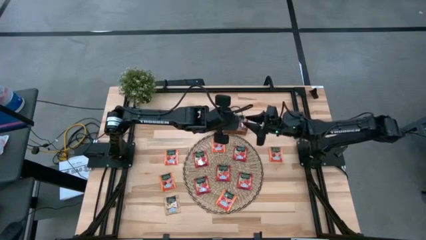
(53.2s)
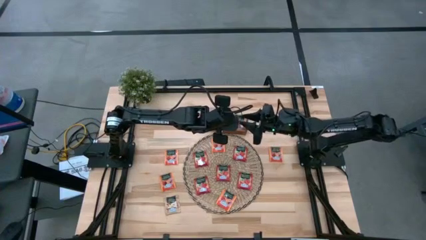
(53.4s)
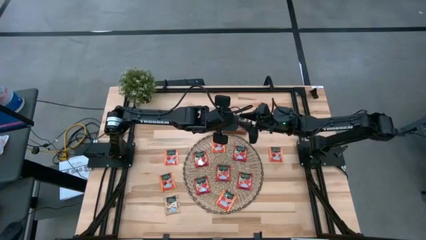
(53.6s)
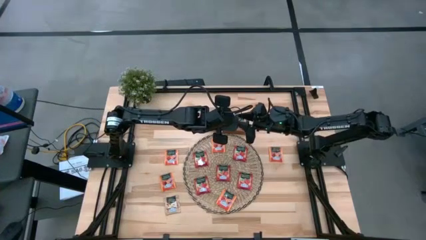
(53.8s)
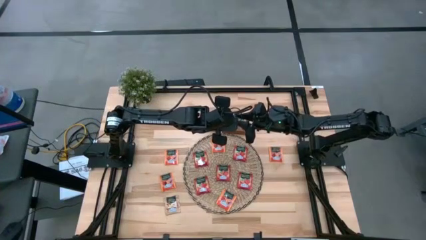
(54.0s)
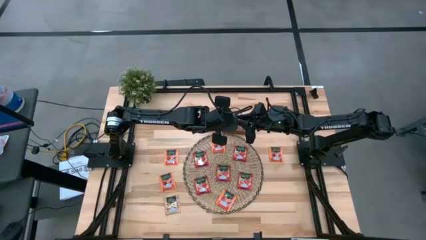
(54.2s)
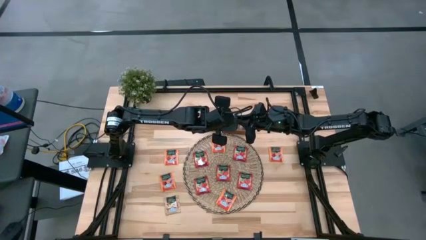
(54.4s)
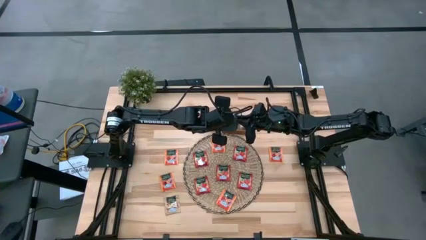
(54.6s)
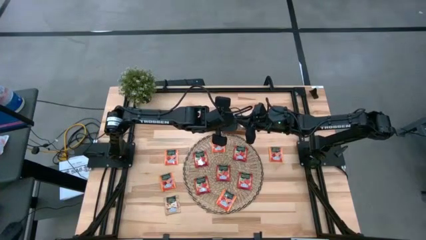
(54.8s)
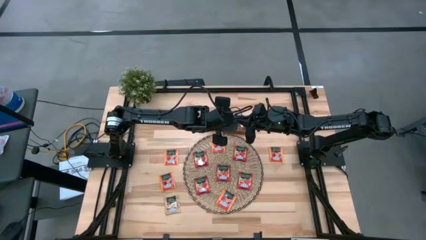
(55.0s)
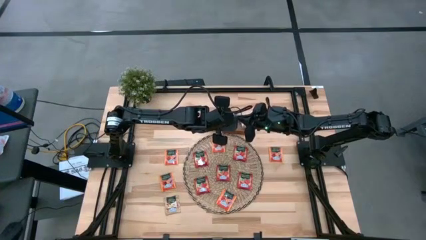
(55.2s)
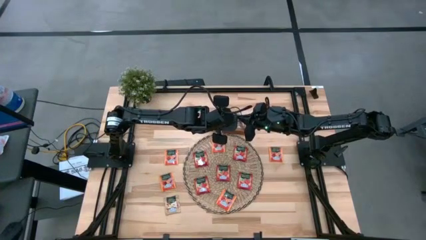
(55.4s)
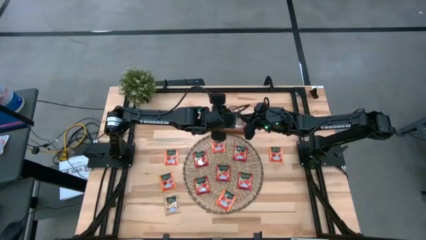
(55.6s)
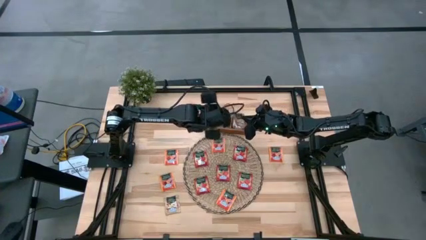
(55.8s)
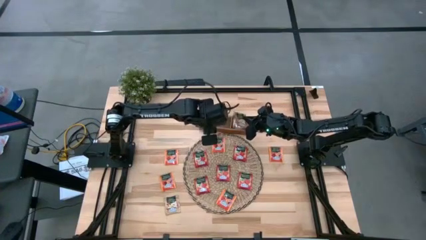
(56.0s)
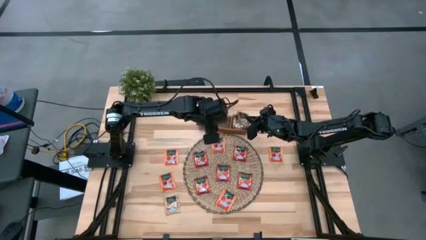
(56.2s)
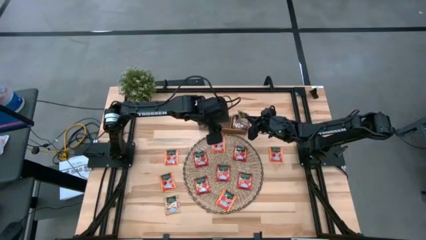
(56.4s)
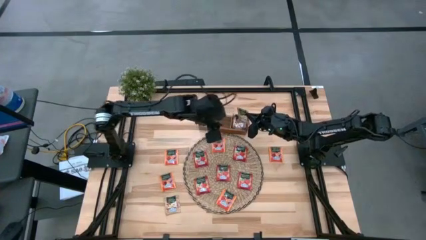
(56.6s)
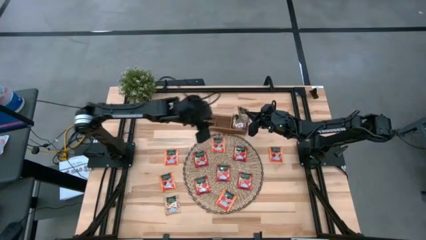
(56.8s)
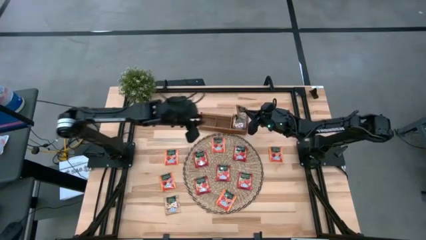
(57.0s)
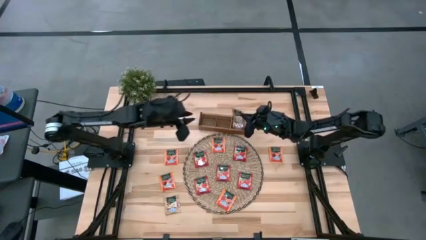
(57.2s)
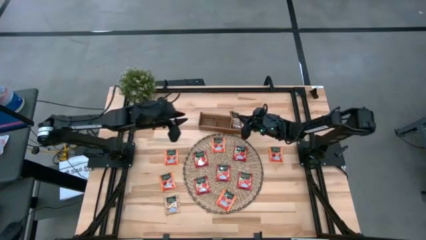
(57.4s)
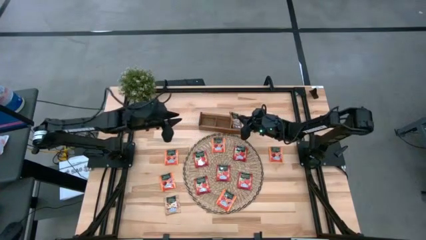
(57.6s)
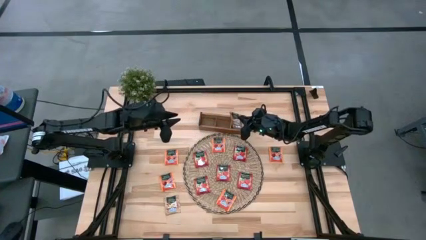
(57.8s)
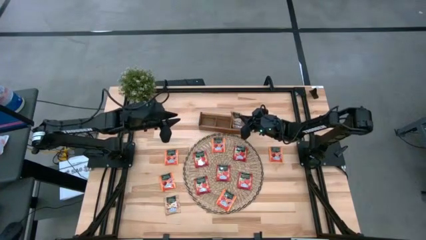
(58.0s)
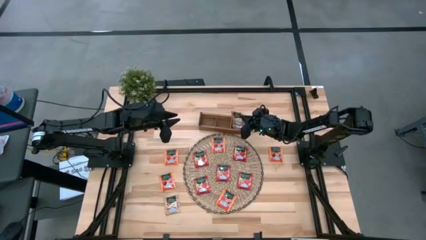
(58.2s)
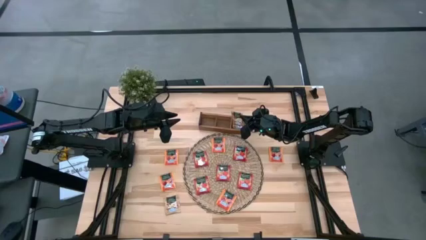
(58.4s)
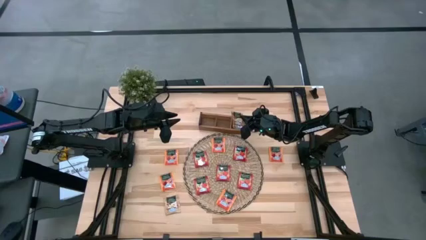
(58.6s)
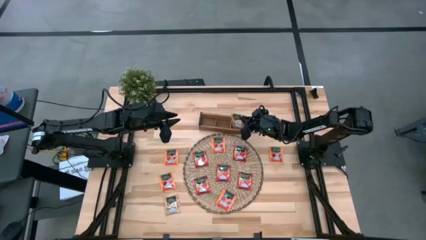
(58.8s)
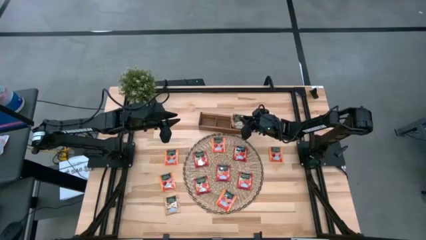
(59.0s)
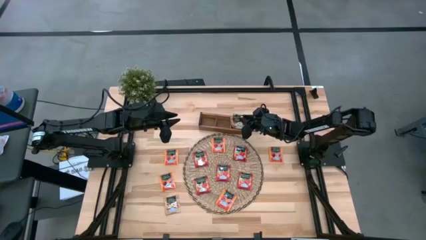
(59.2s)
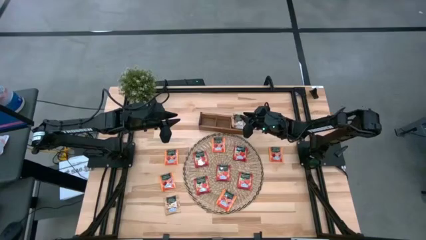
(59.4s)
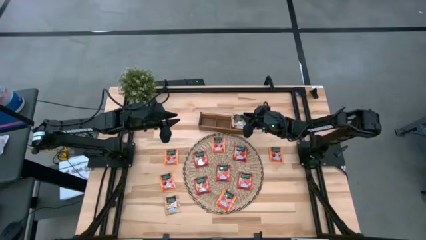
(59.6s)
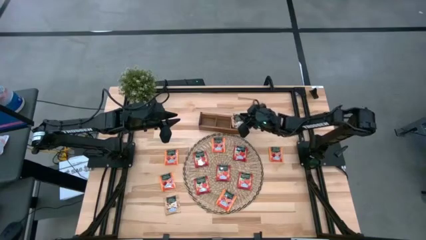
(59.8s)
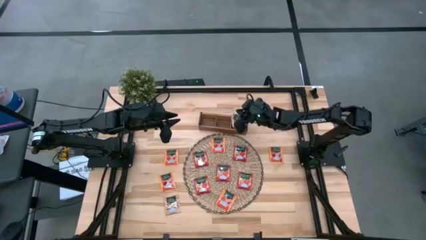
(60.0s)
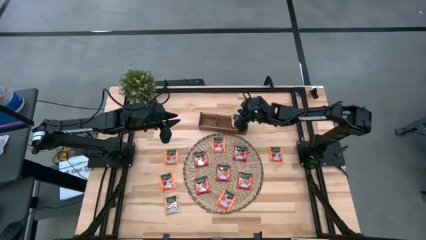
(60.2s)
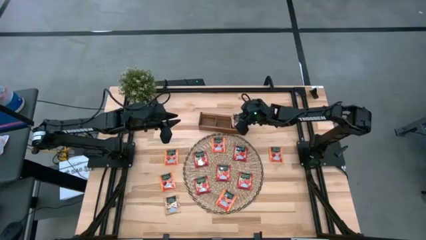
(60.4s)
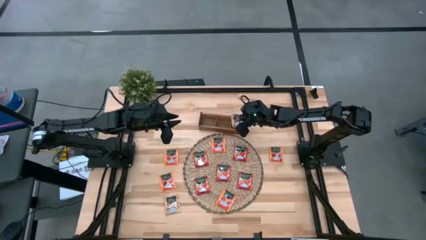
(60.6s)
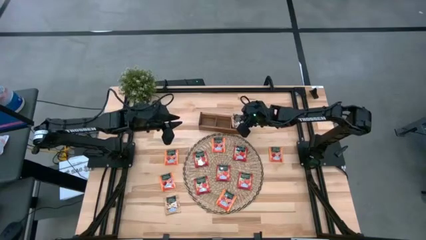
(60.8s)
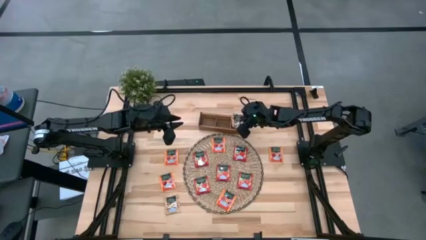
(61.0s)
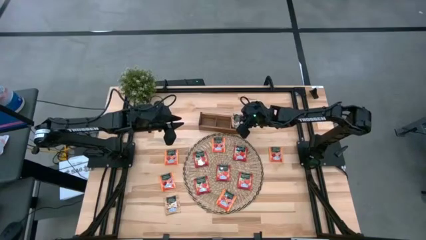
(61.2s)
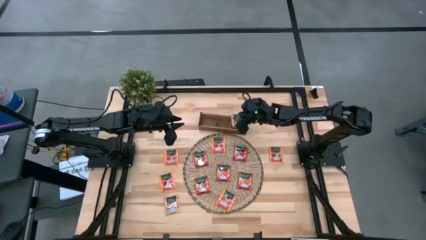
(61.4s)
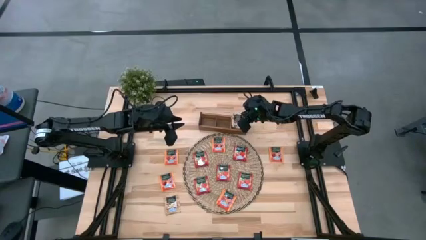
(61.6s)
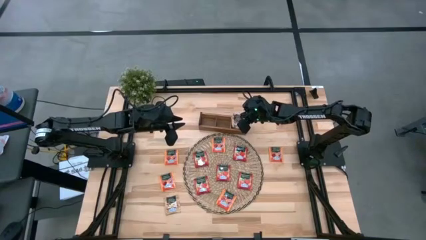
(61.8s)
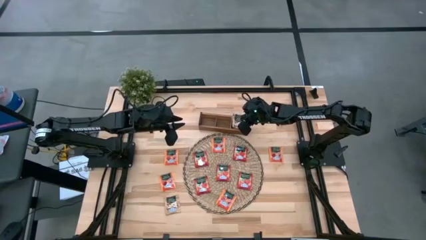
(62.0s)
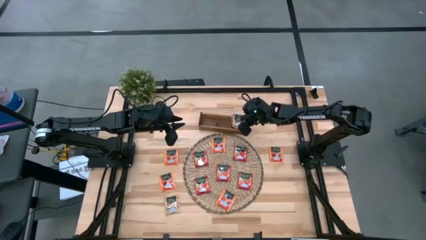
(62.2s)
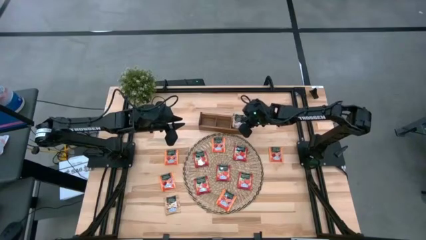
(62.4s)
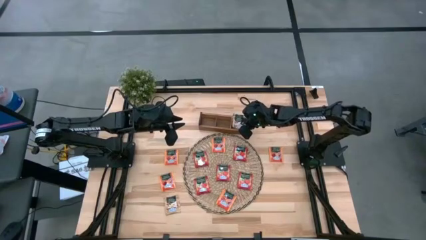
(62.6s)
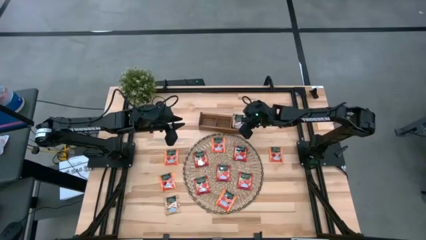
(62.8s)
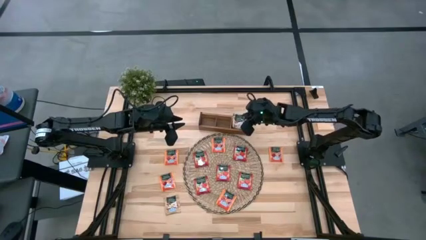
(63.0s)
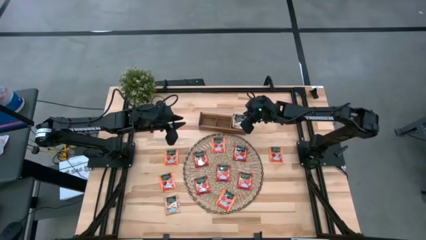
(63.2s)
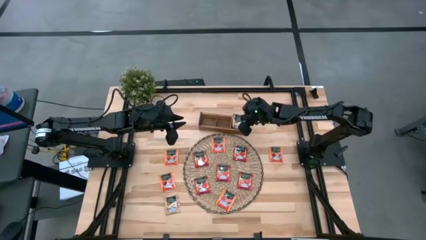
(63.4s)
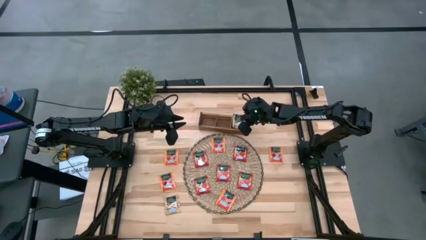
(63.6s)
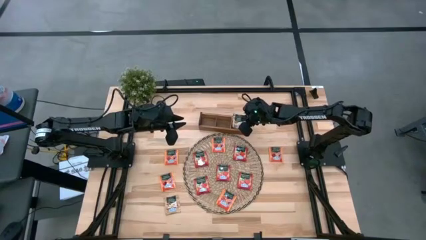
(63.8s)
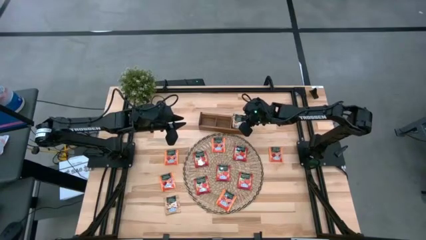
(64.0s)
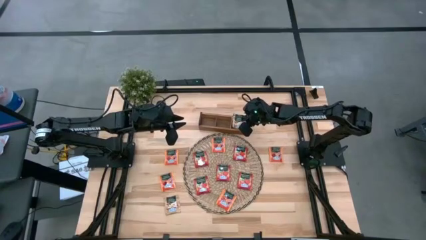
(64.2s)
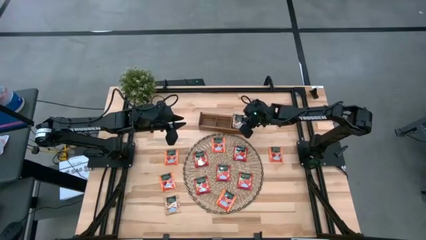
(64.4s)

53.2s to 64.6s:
Task: Pick & Place Tea
Put the brown tea bag into the right section of the wooden organizer
